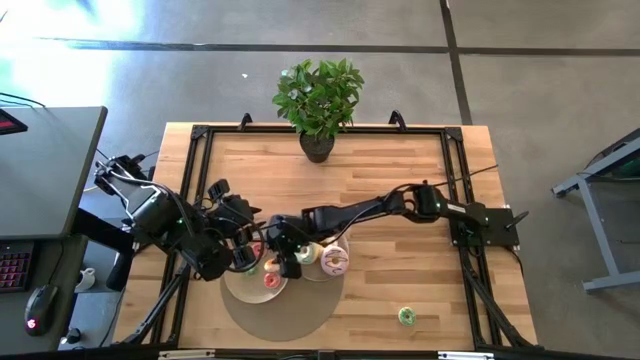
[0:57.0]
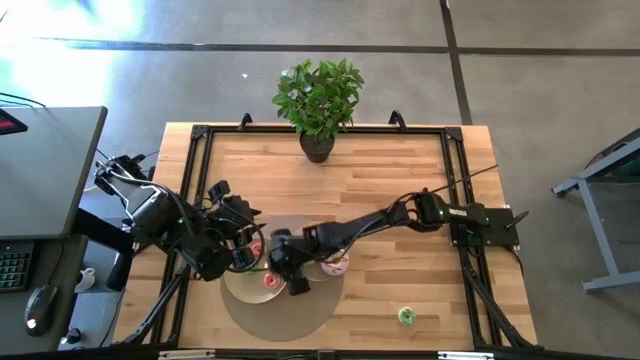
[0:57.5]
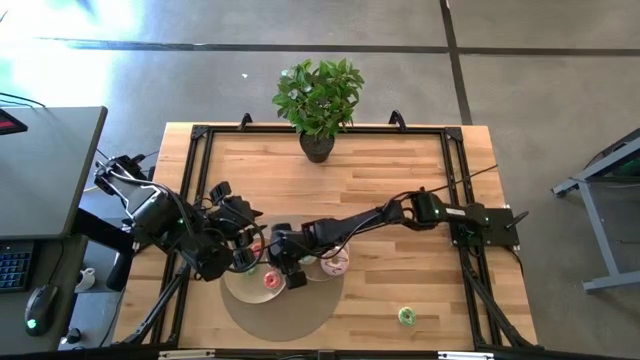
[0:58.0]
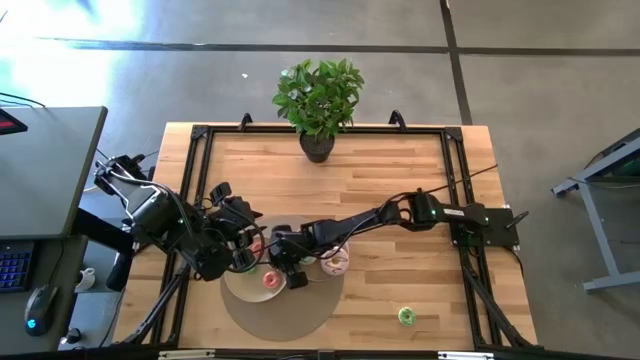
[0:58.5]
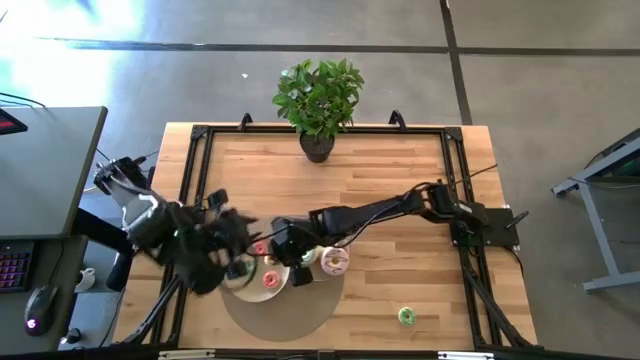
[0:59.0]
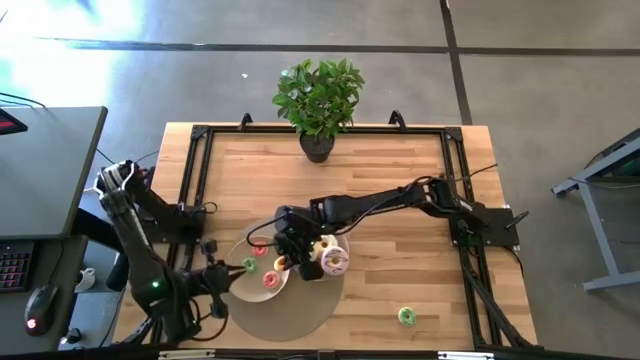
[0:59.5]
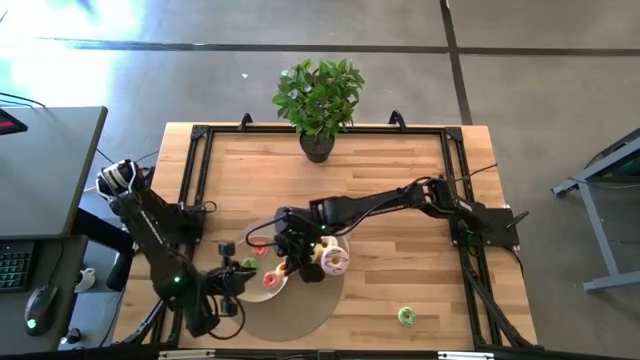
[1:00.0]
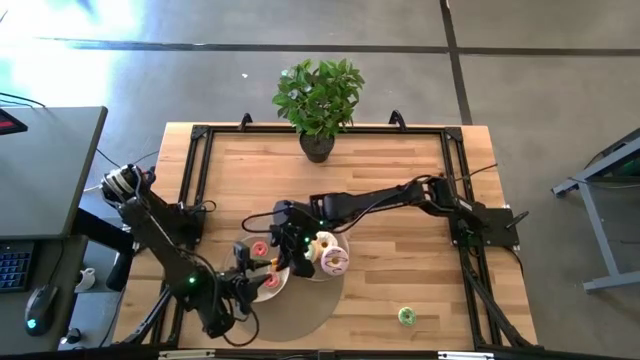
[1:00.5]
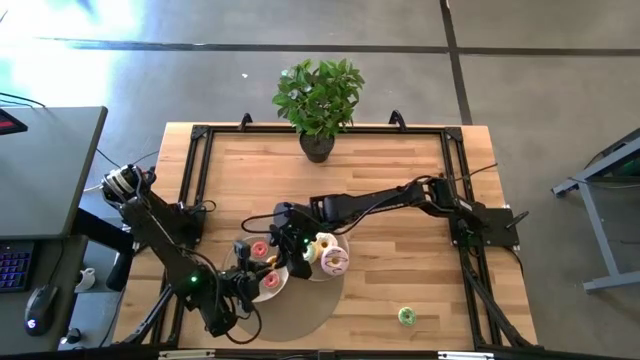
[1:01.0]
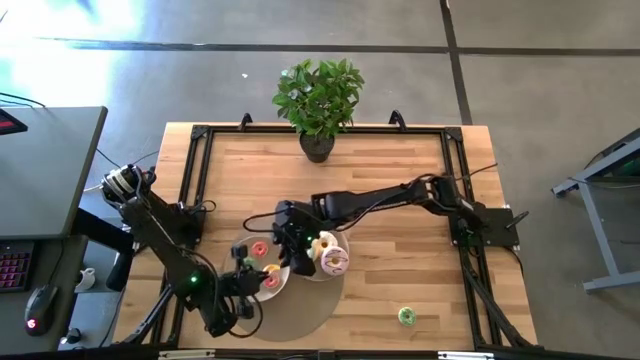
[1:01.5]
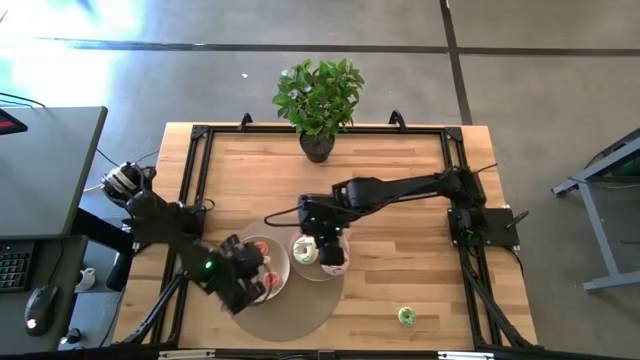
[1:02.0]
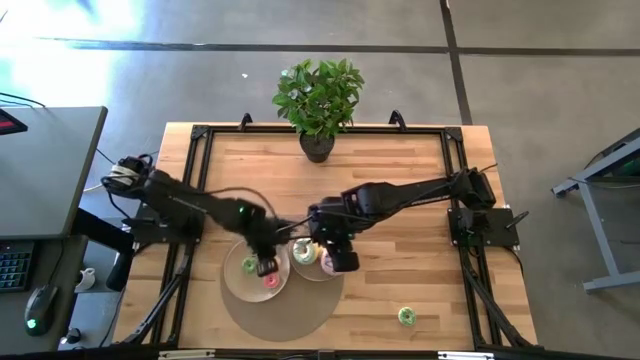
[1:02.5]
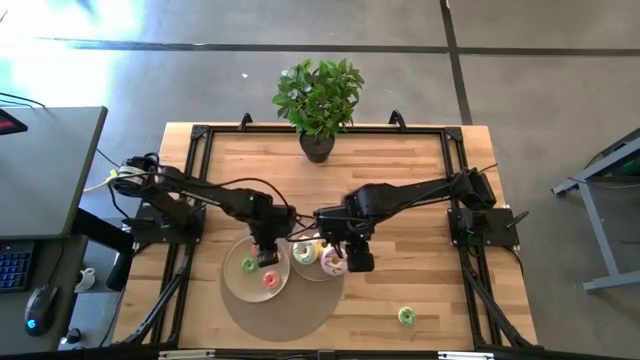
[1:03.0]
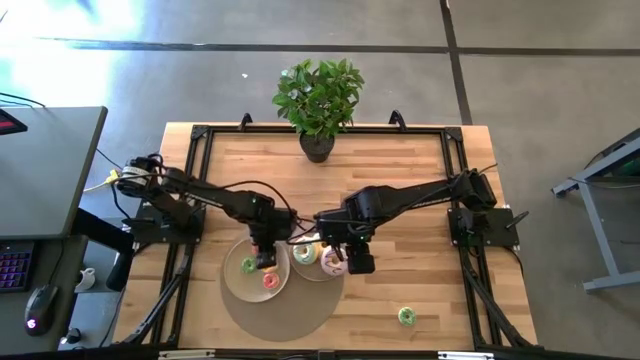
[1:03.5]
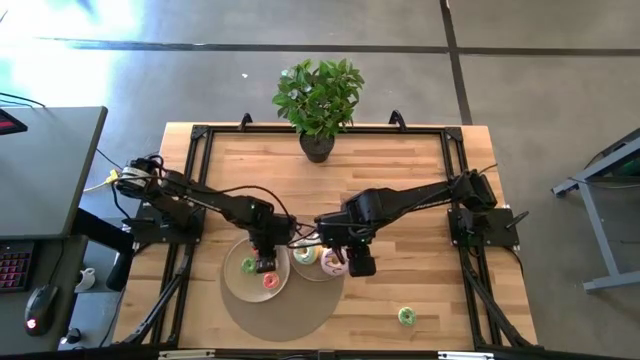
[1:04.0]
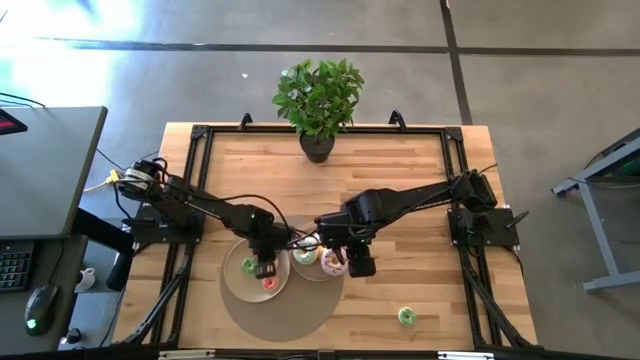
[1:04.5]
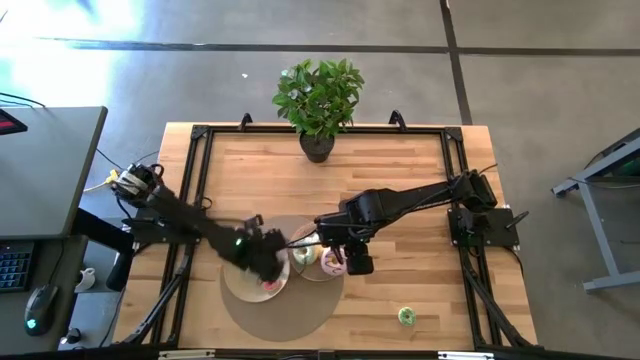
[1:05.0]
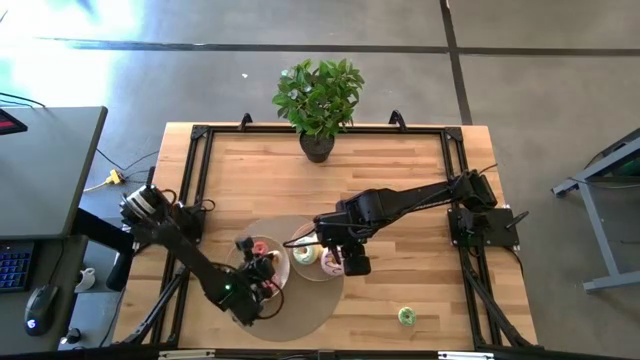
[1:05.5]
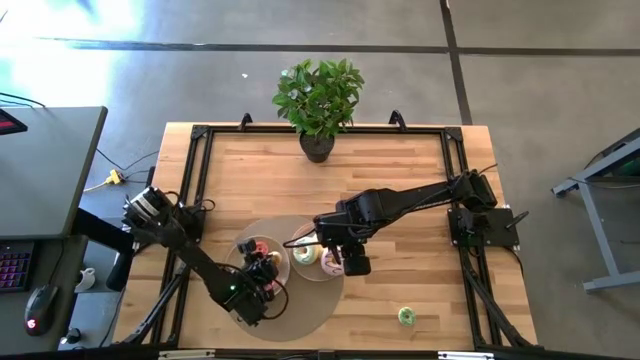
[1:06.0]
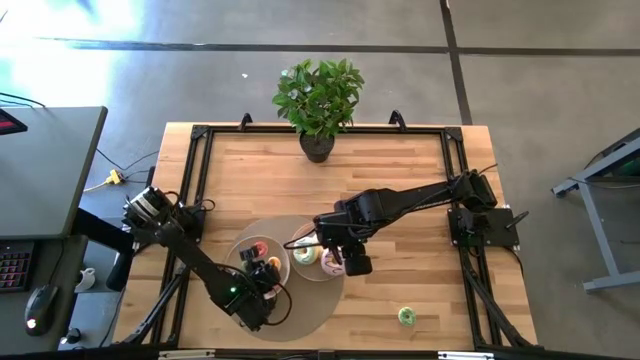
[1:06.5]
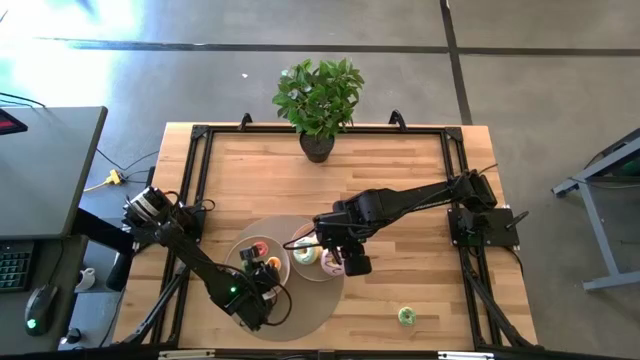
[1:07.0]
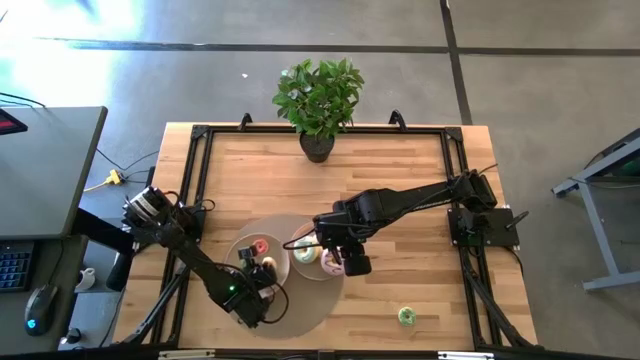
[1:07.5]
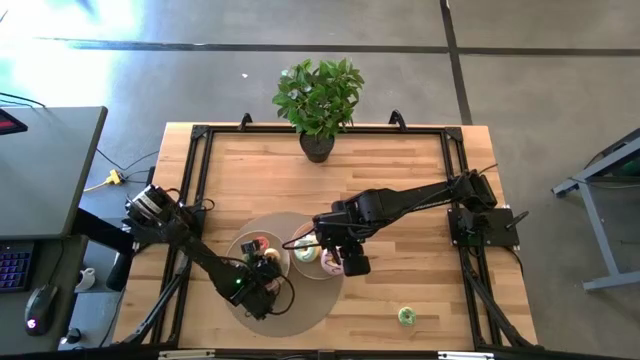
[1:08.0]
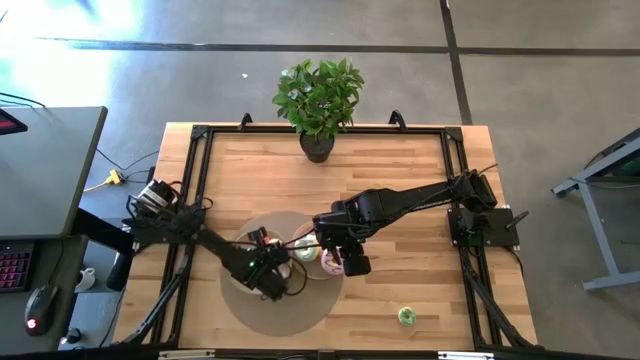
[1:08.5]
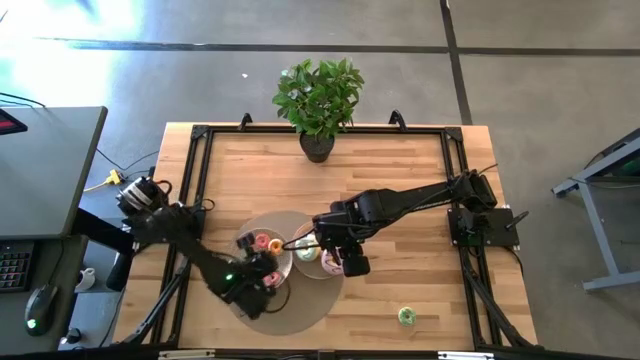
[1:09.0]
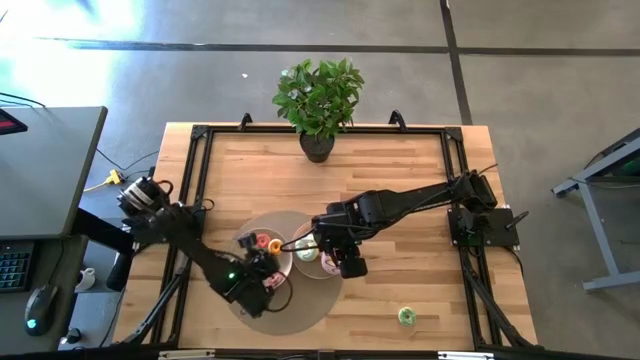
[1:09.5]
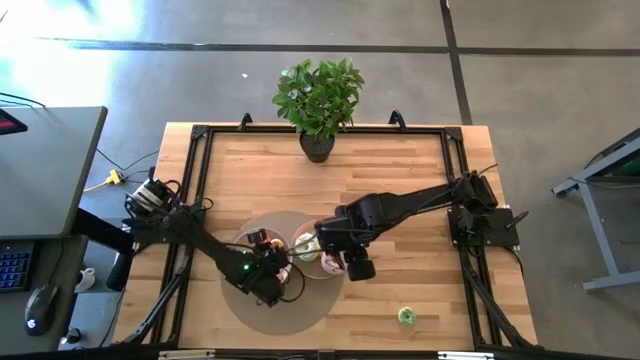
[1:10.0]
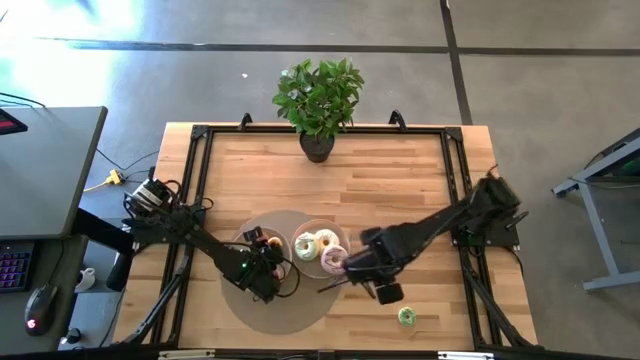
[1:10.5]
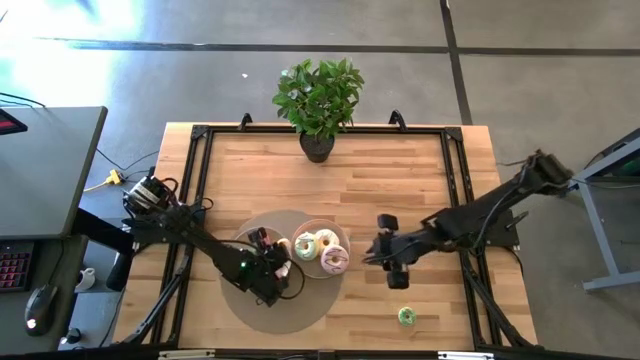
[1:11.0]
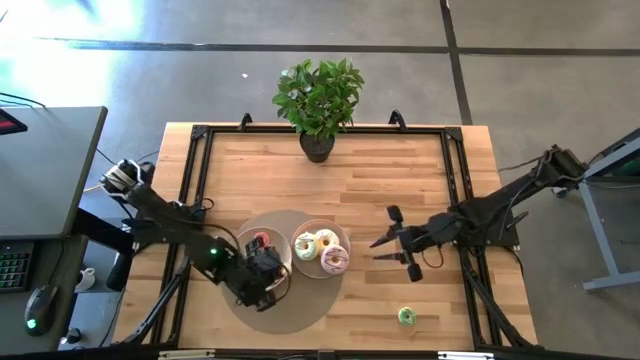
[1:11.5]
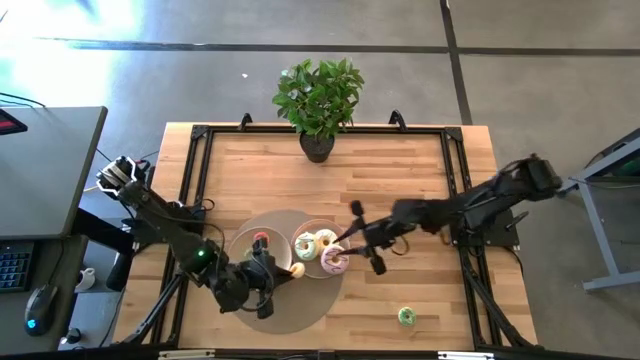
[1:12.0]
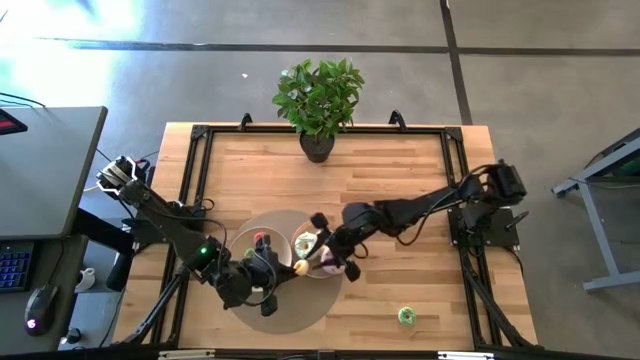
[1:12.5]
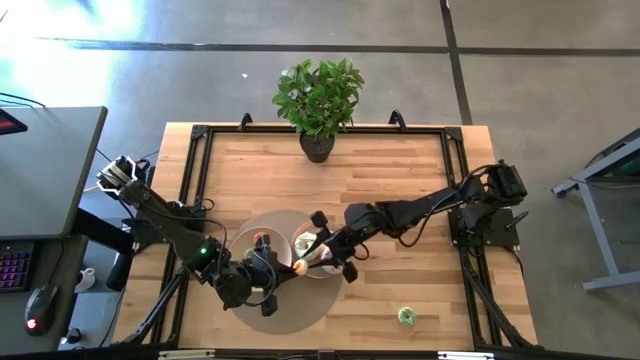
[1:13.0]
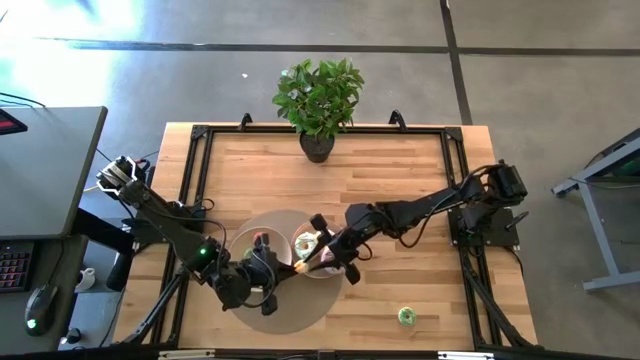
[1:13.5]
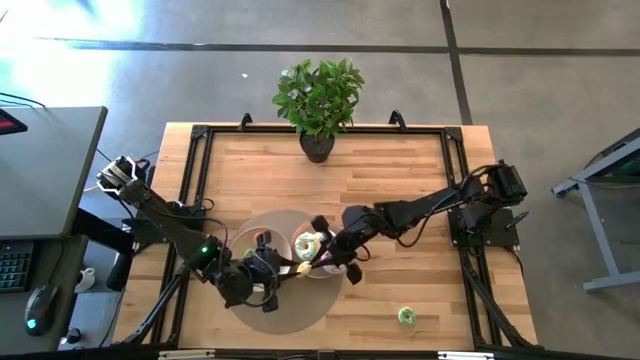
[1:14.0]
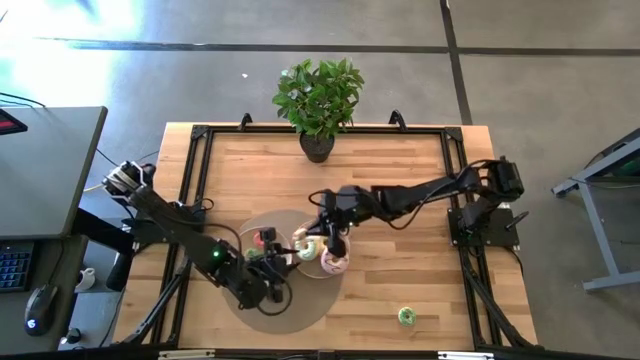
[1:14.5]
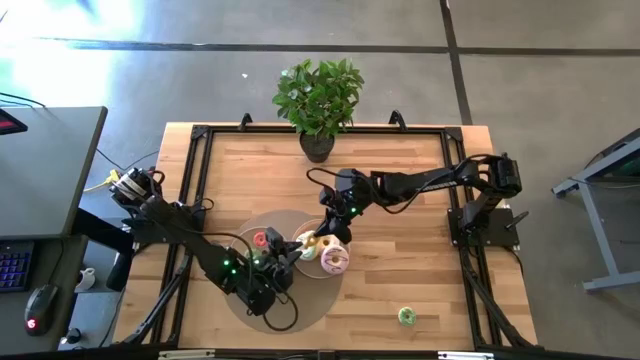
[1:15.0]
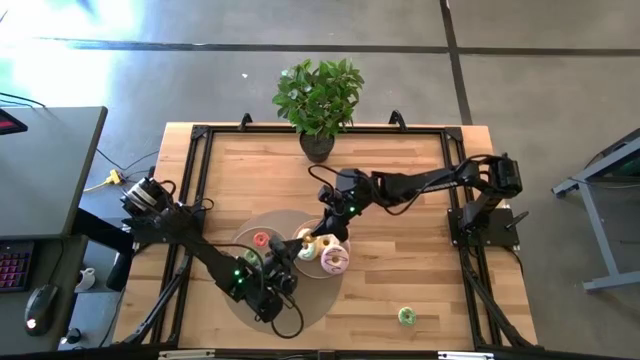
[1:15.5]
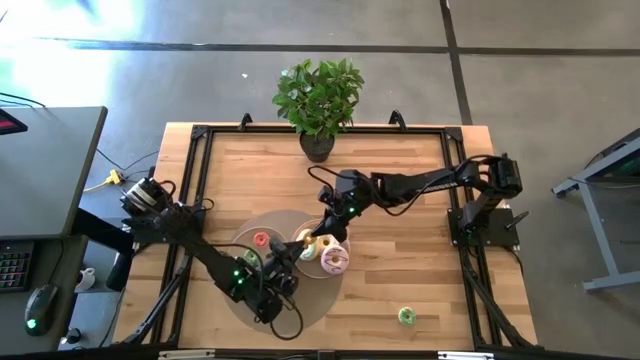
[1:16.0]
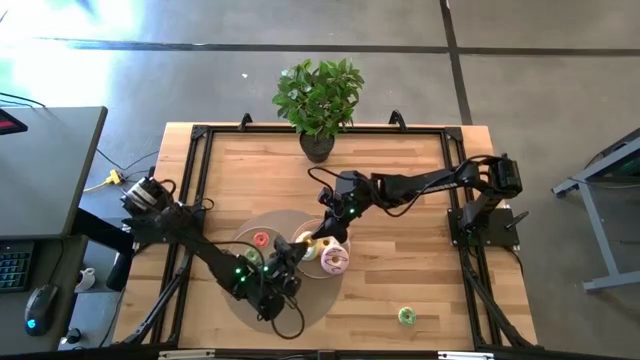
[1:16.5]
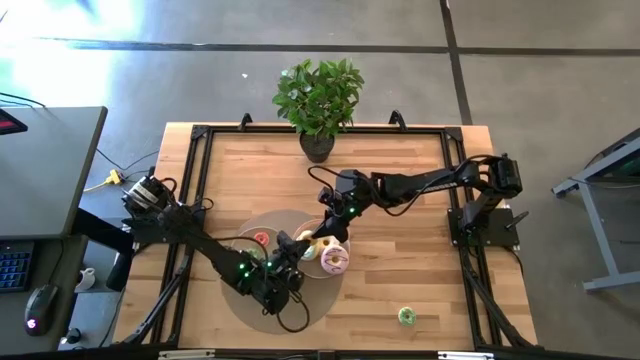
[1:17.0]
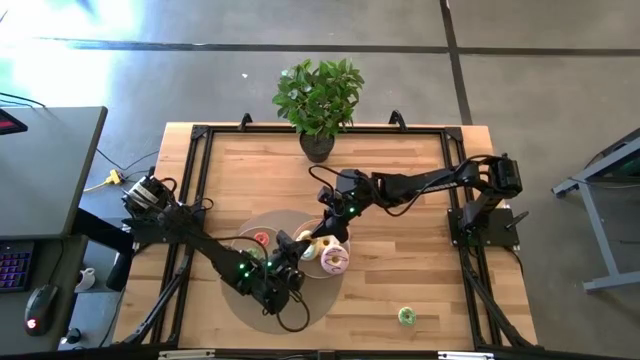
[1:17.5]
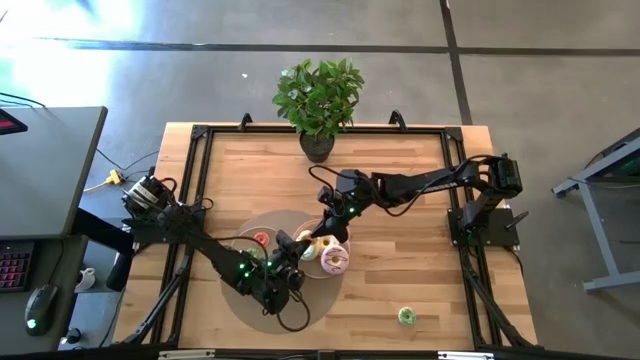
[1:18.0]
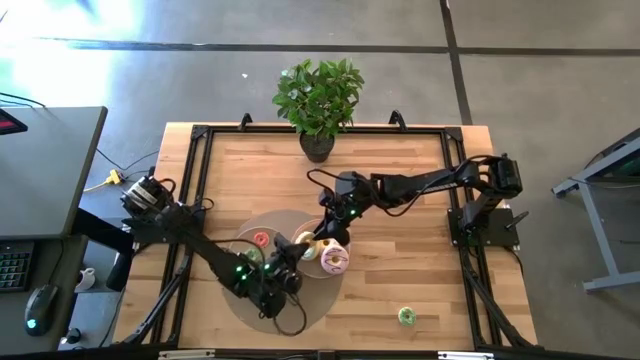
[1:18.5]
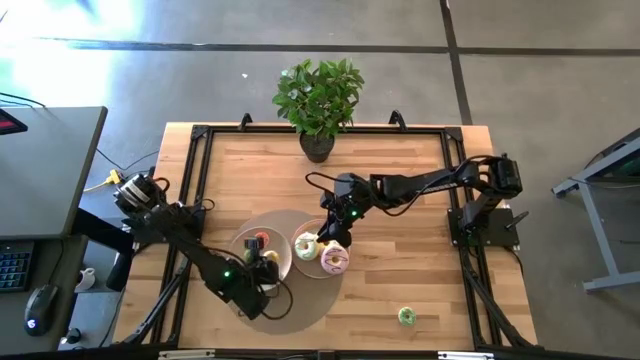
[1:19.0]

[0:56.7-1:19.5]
Task: Pick & Place donuts
Adjust the small yellow donut
